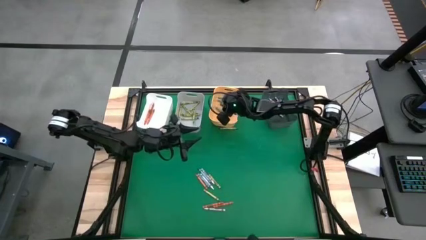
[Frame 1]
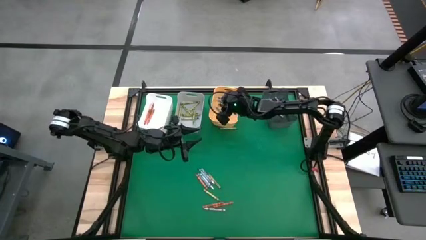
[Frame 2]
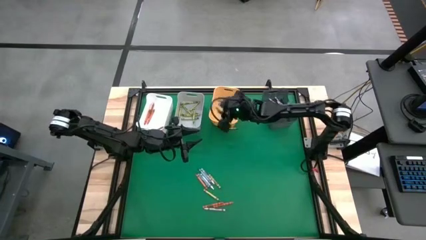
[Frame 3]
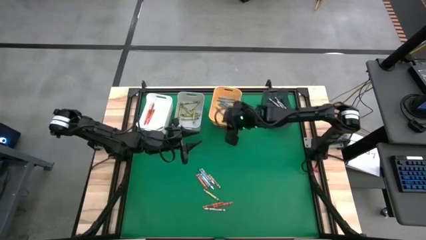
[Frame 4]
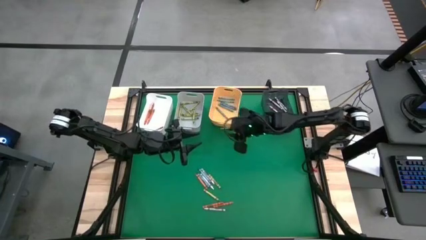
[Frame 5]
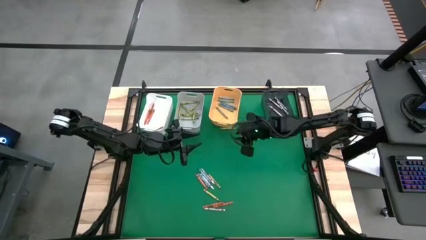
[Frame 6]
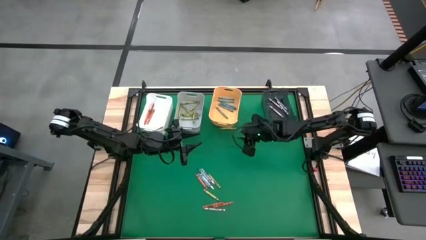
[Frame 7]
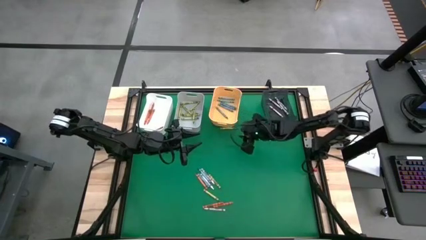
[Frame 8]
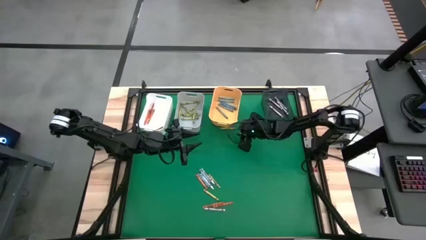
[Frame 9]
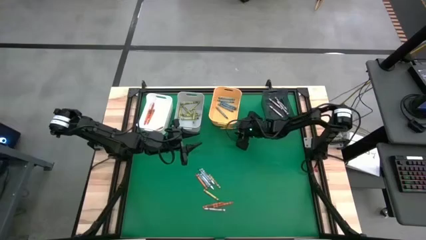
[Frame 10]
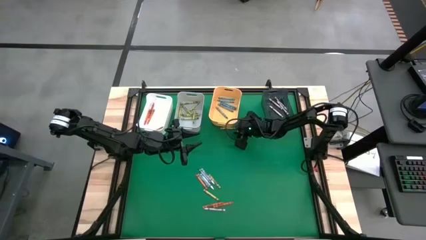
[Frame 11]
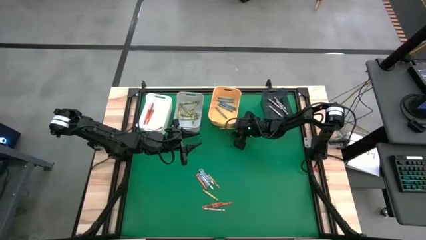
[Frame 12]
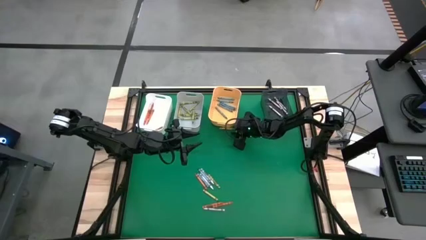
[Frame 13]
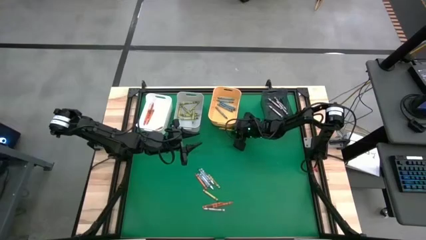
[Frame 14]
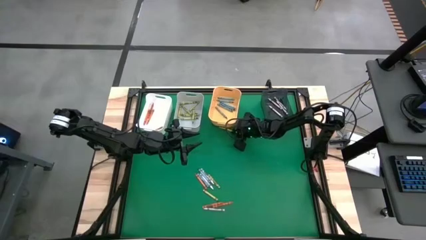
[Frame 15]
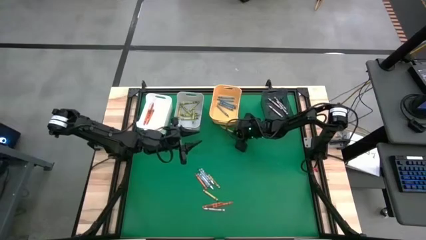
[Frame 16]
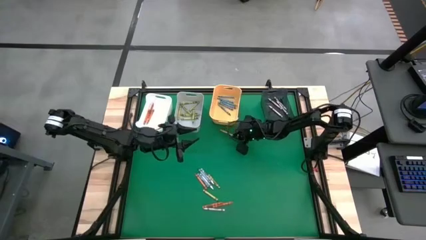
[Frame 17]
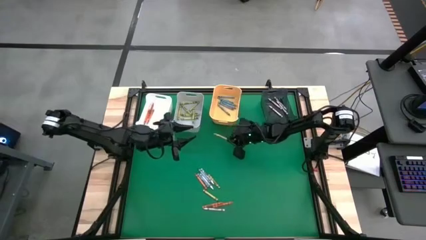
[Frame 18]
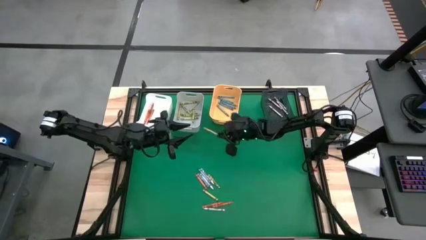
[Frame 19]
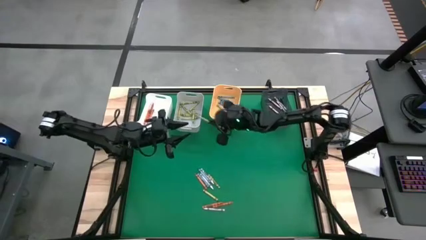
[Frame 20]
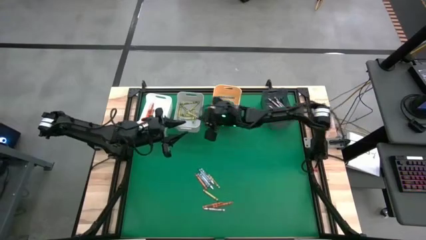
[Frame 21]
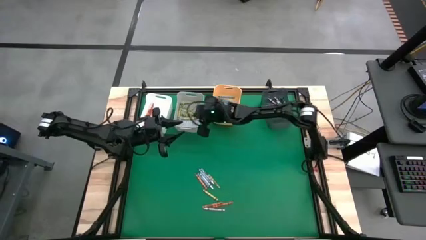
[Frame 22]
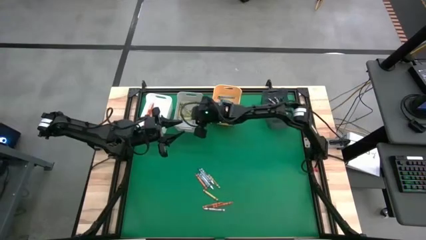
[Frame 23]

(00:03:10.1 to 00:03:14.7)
Task: Sort crayons
Put the green crayon into the gray bin

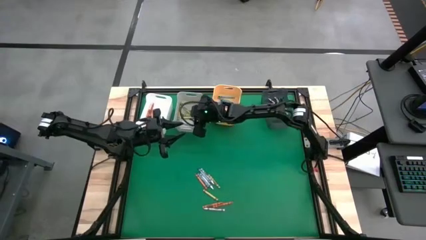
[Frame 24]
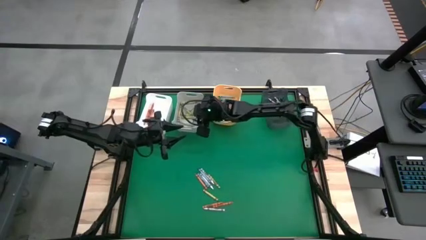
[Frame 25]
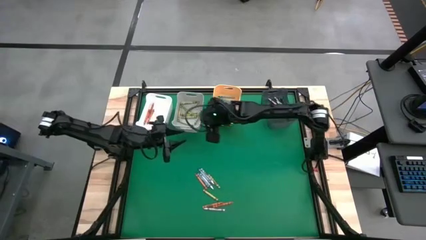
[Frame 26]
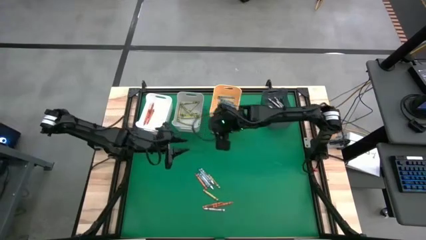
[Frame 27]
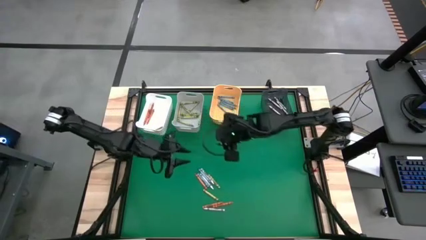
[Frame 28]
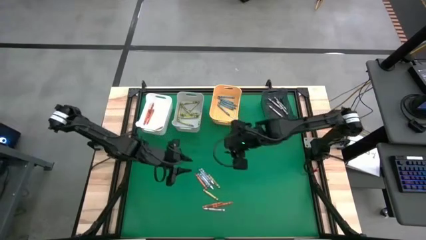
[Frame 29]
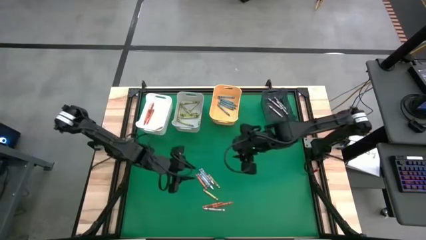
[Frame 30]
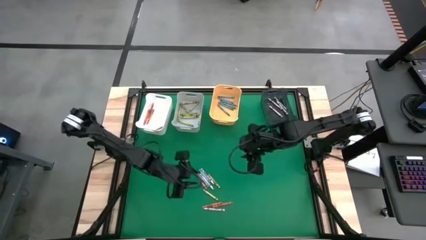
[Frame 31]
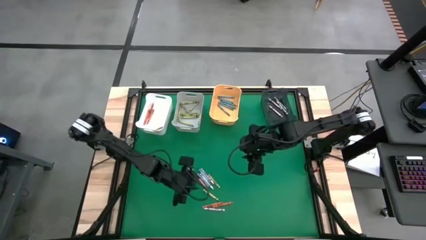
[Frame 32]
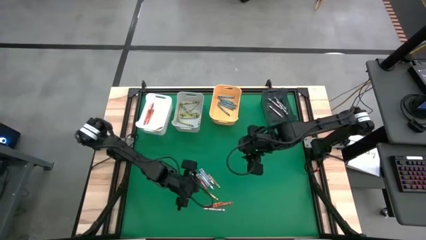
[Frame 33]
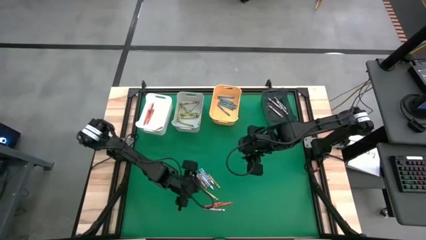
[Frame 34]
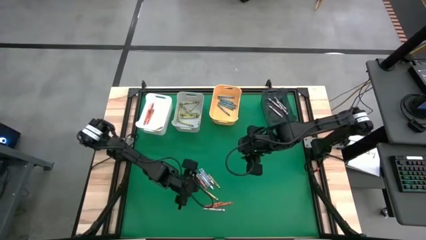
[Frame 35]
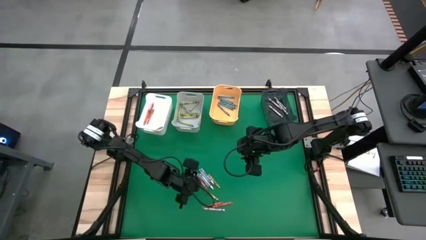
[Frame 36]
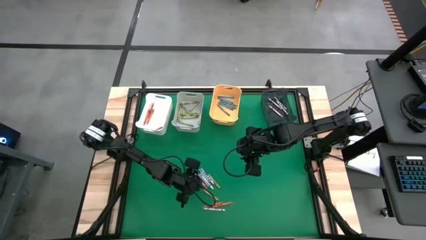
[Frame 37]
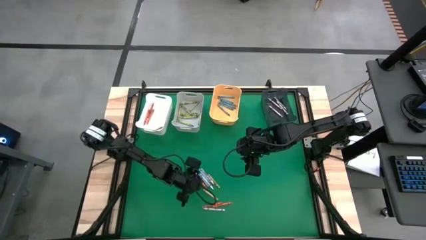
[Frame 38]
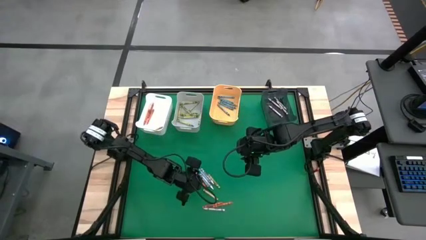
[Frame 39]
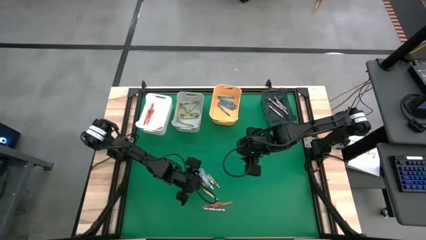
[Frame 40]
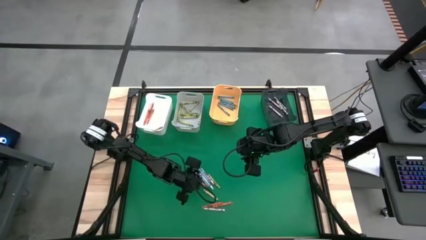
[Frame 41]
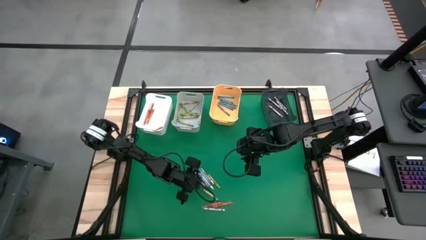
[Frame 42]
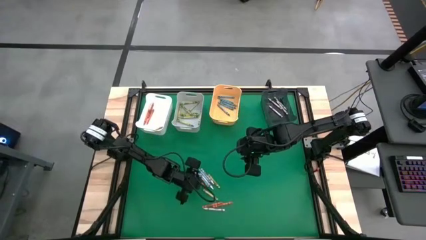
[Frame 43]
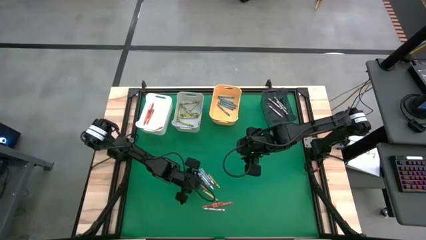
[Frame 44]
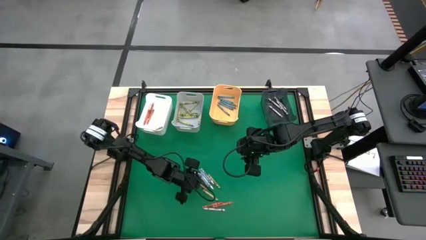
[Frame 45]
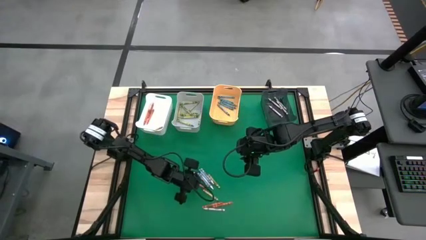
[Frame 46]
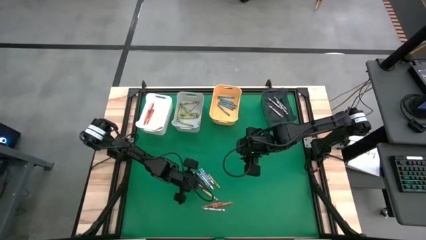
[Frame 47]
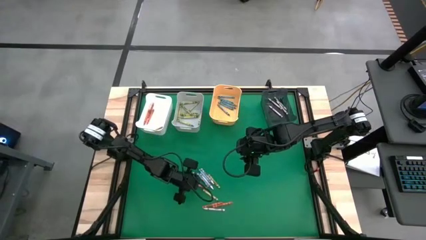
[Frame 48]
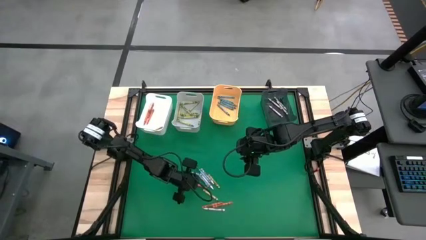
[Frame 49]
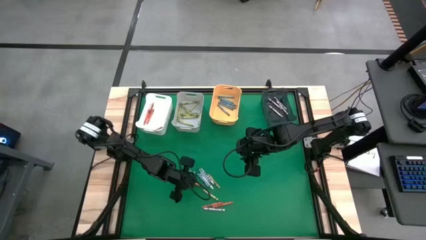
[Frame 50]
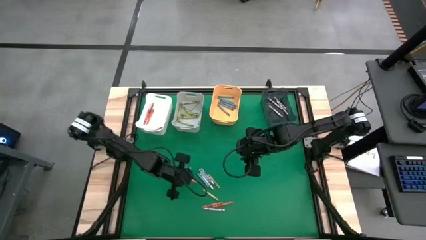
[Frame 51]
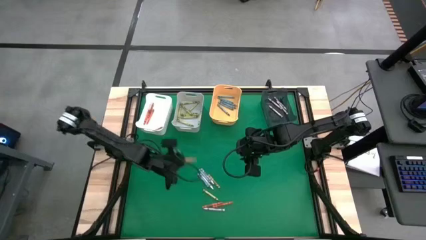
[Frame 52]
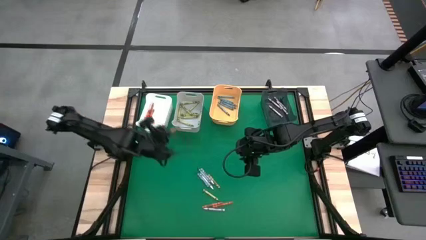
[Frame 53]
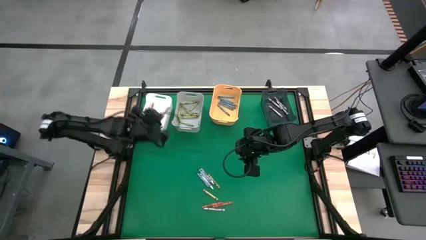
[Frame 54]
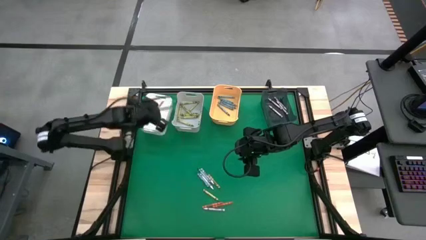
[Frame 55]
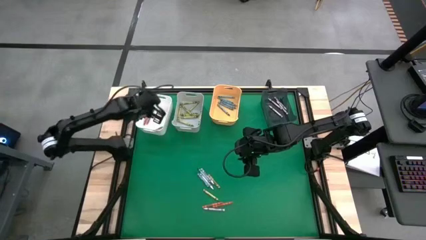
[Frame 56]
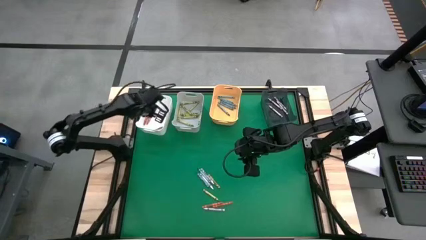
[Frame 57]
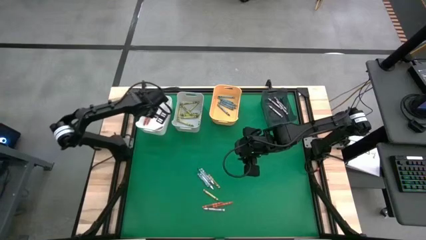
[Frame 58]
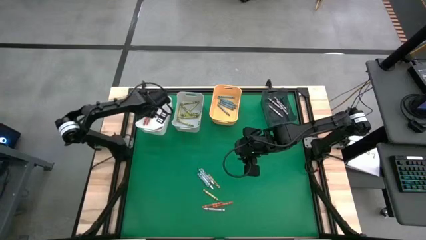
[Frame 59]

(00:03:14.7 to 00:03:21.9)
Put the orange crayon into the white bin

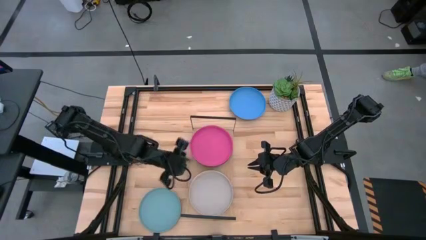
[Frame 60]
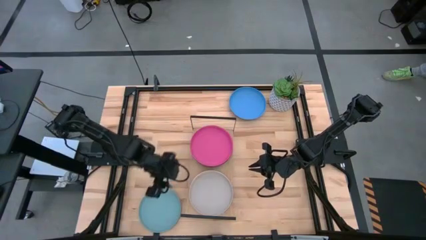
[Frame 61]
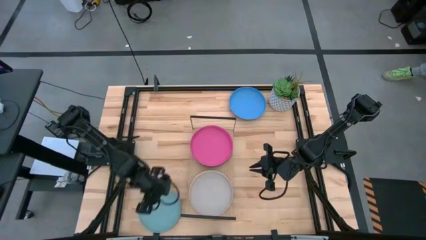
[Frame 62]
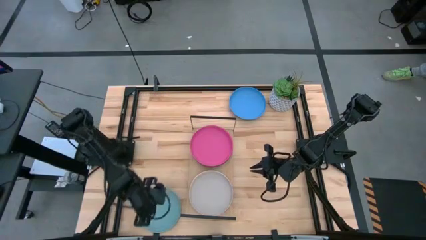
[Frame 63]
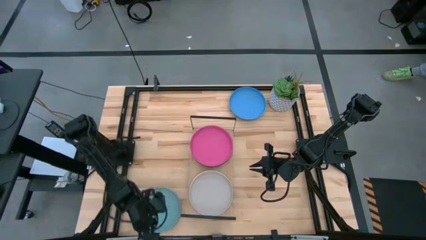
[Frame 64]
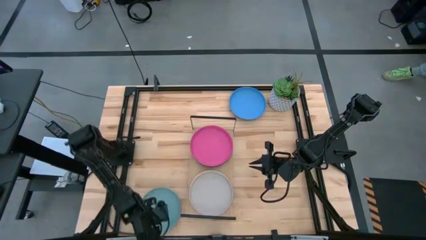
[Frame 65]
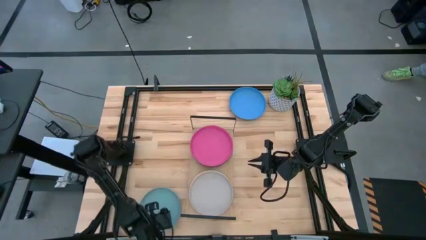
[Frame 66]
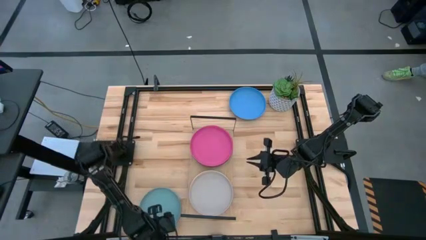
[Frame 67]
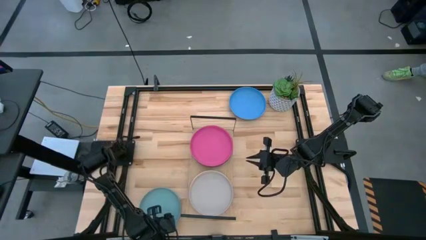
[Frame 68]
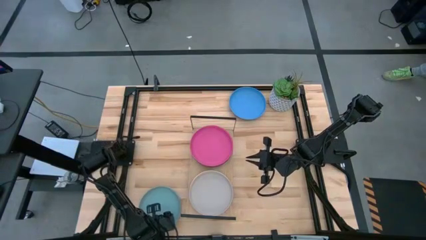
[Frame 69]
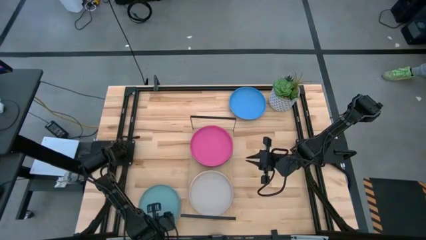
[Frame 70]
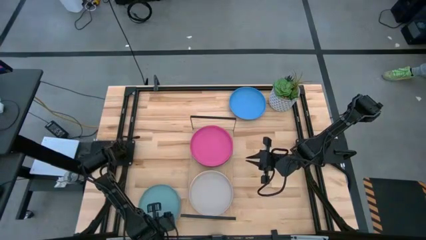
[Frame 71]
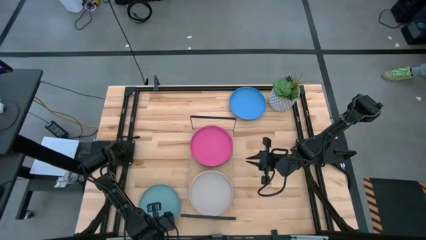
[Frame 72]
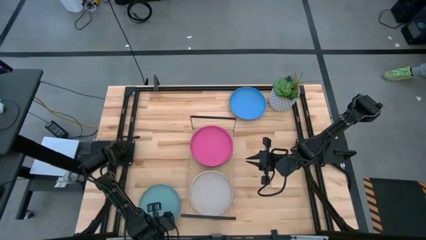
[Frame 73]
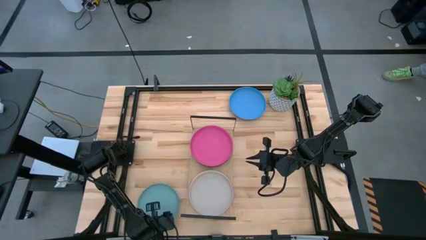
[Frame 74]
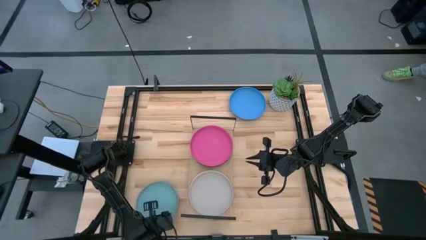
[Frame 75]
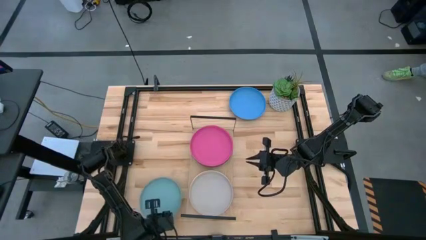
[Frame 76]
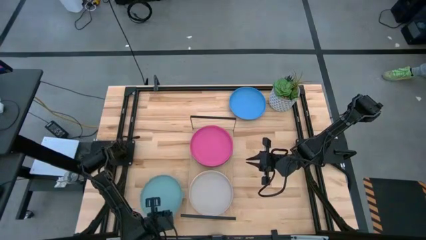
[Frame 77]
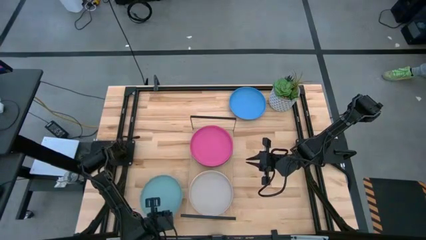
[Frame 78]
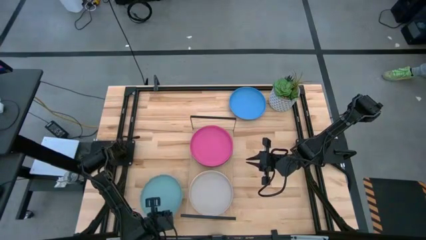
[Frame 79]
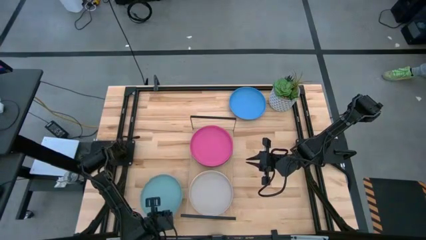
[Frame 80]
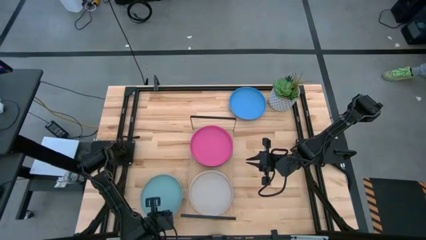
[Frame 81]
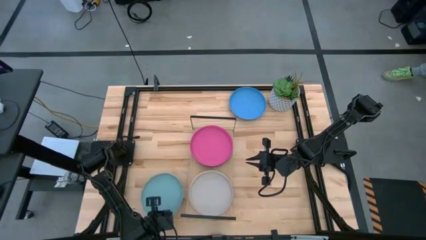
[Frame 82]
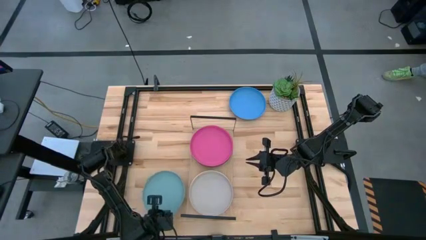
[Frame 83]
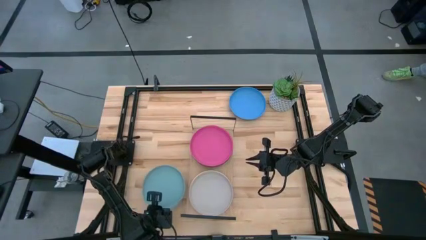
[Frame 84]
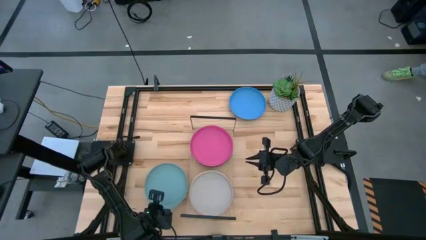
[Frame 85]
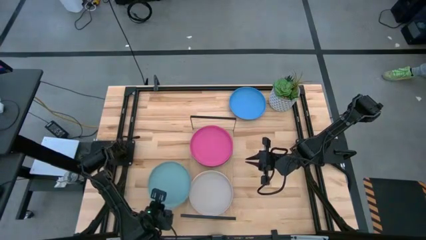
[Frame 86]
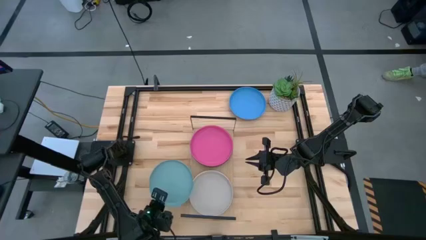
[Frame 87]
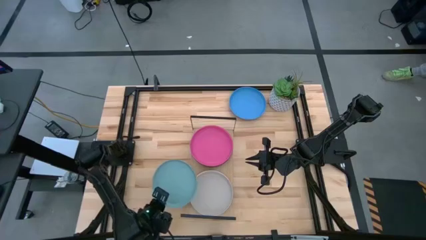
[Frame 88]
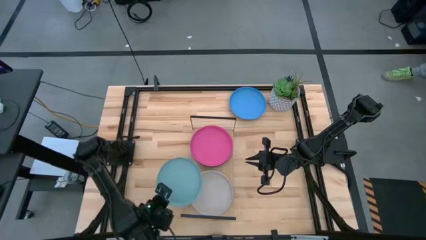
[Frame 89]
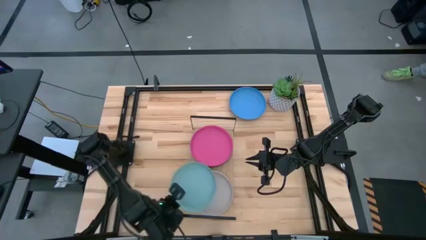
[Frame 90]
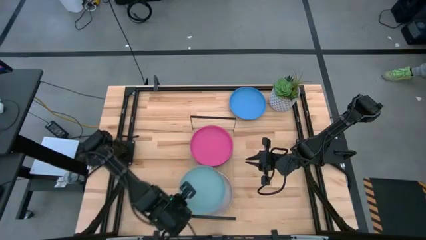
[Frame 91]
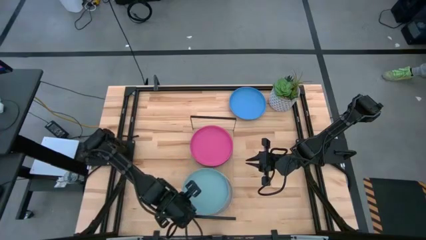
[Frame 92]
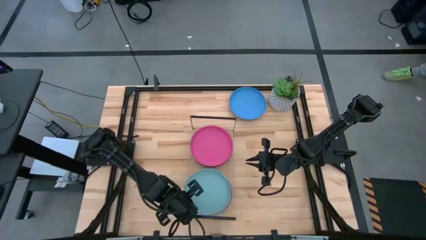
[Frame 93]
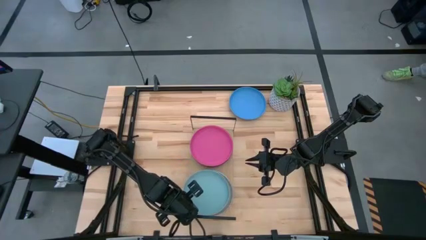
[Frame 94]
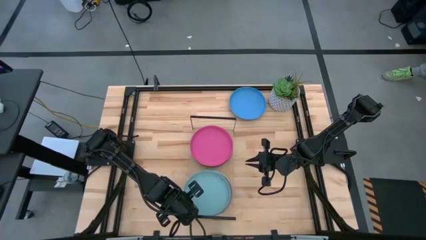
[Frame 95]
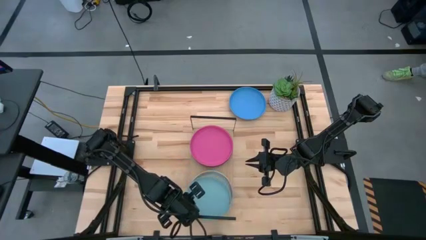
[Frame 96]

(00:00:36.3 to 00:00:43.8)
Task: Place and stack plates onto a shelf
Stack the light blue plate on top of the gray plate on the shelf
